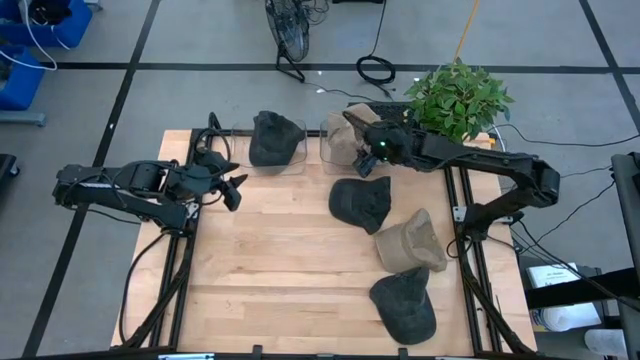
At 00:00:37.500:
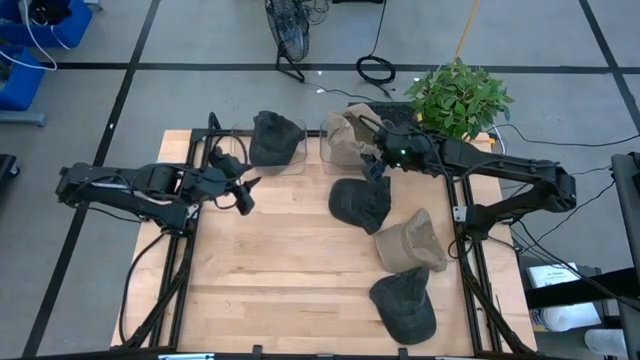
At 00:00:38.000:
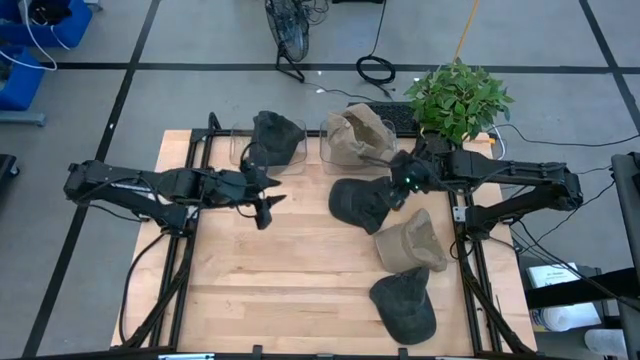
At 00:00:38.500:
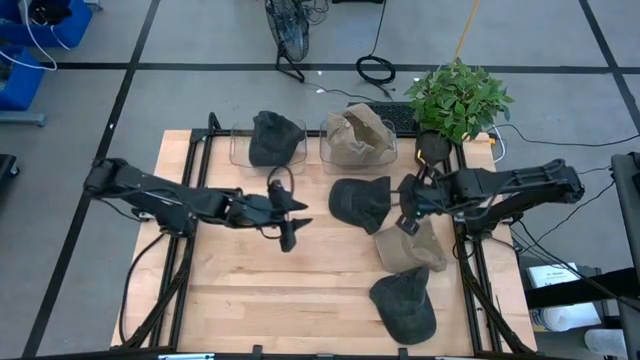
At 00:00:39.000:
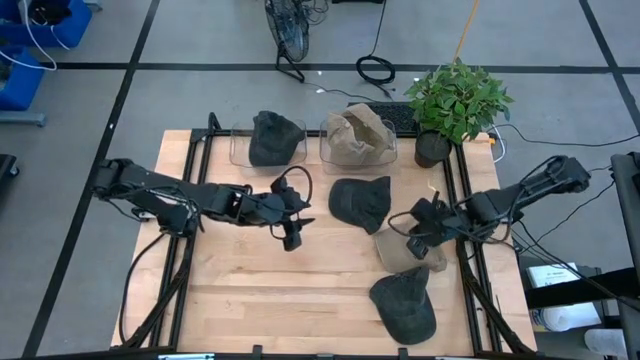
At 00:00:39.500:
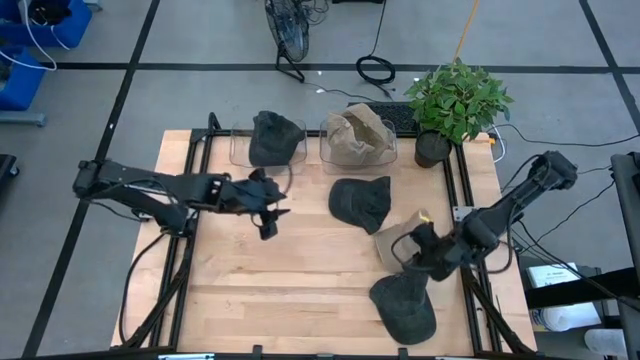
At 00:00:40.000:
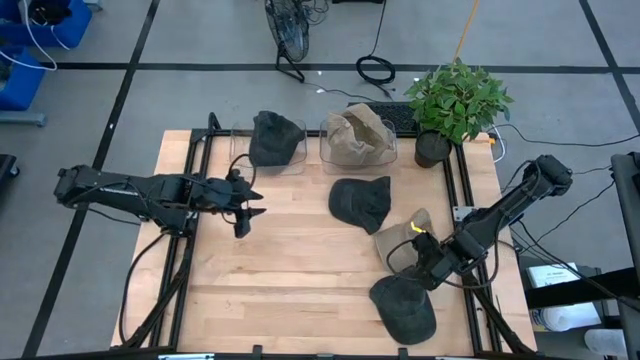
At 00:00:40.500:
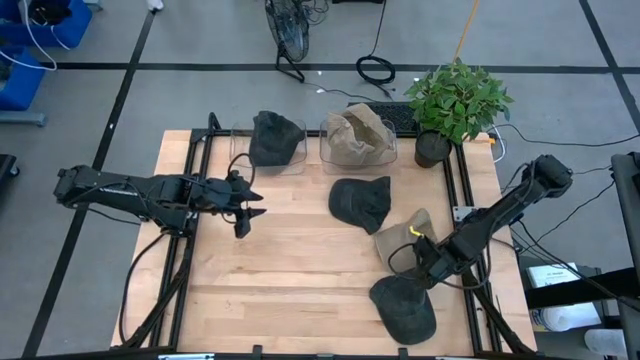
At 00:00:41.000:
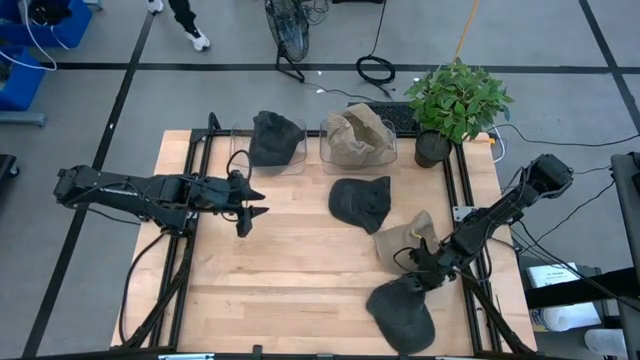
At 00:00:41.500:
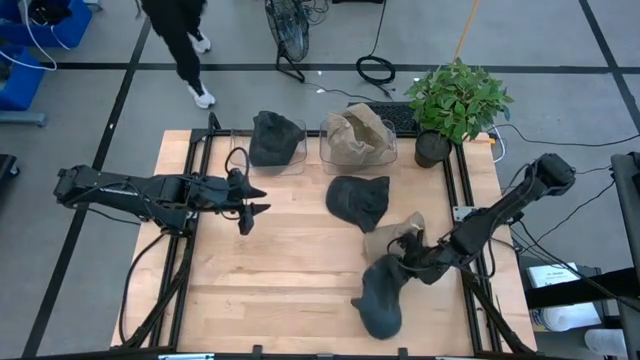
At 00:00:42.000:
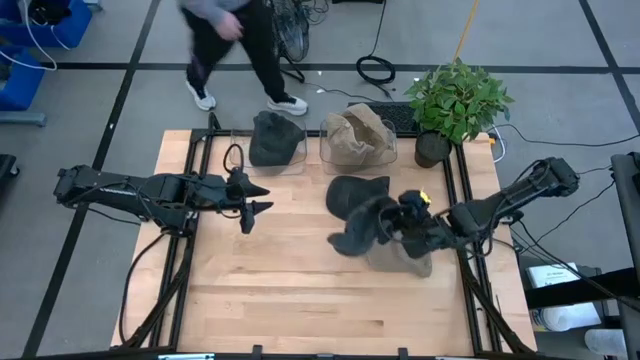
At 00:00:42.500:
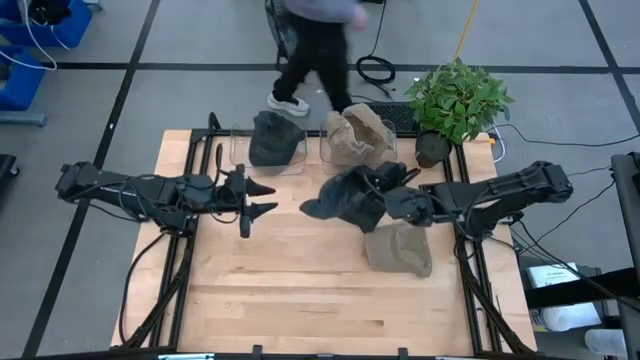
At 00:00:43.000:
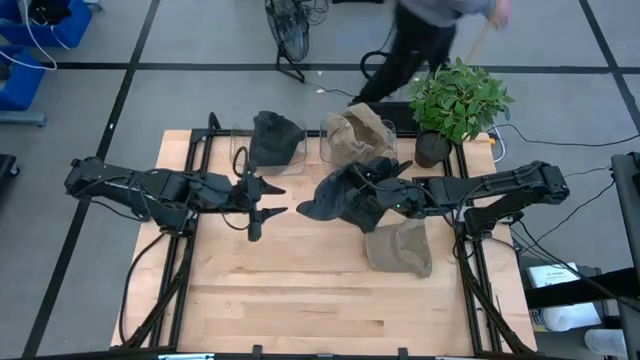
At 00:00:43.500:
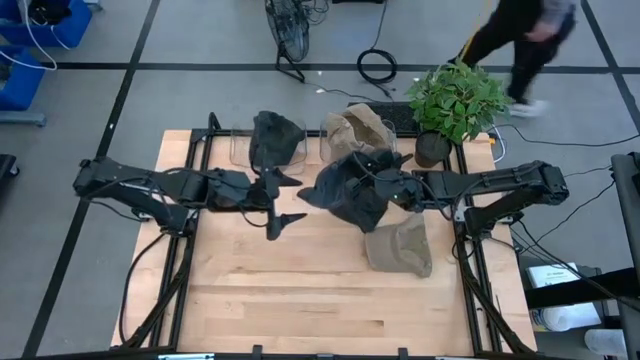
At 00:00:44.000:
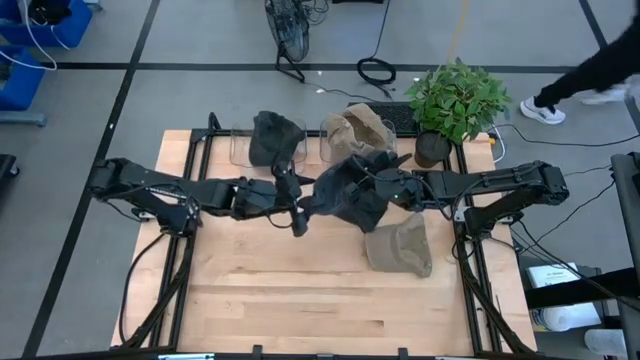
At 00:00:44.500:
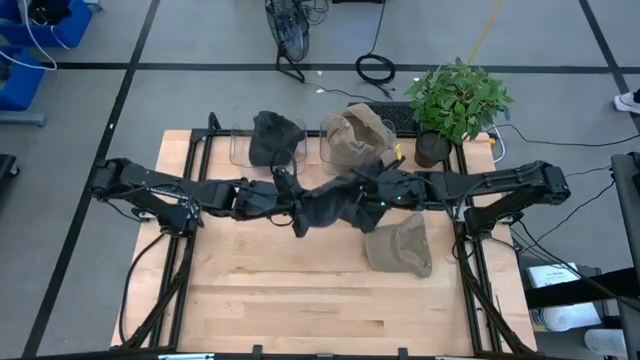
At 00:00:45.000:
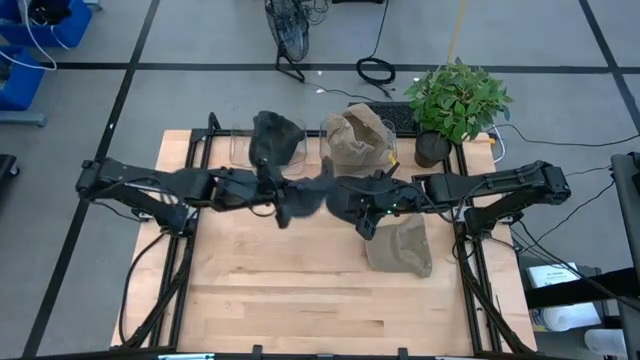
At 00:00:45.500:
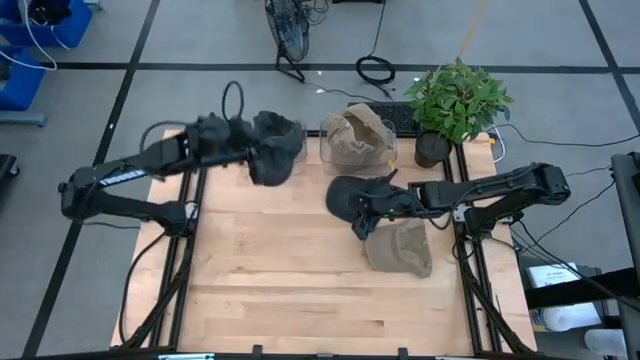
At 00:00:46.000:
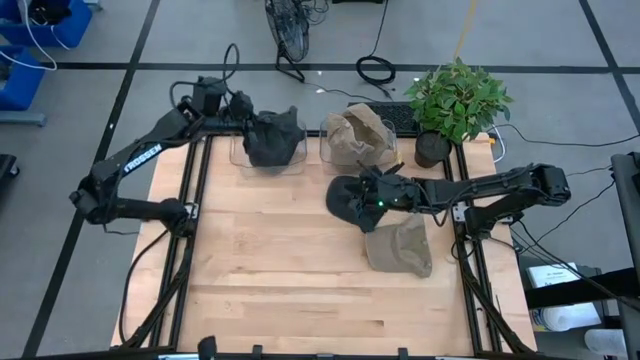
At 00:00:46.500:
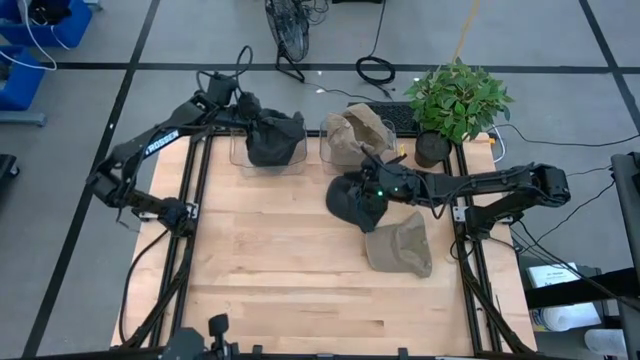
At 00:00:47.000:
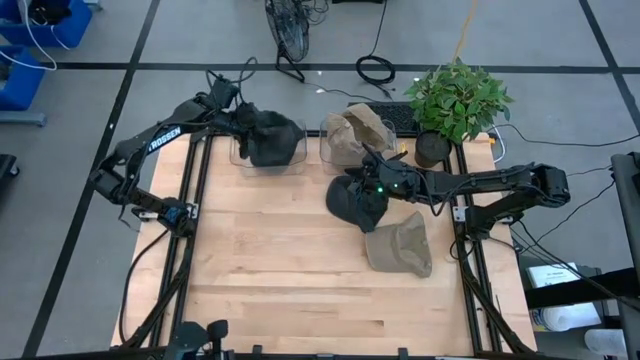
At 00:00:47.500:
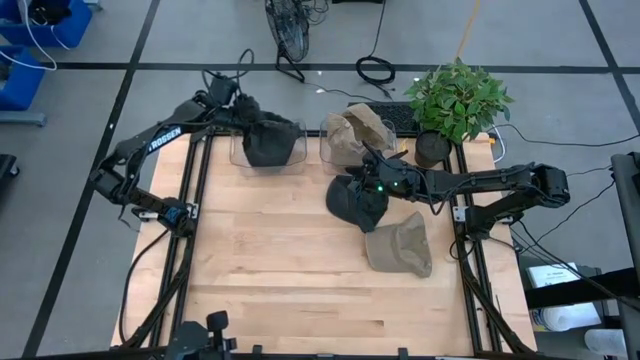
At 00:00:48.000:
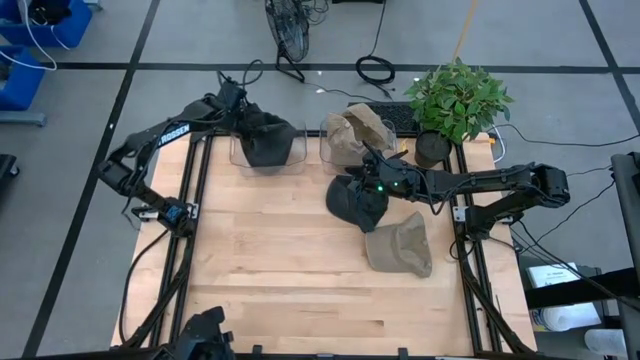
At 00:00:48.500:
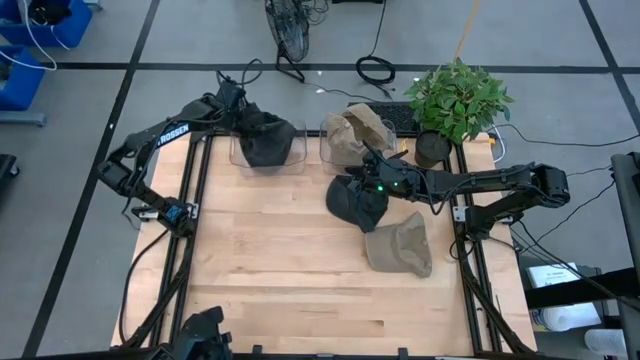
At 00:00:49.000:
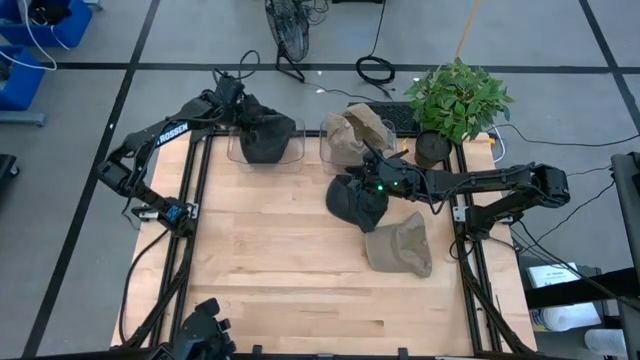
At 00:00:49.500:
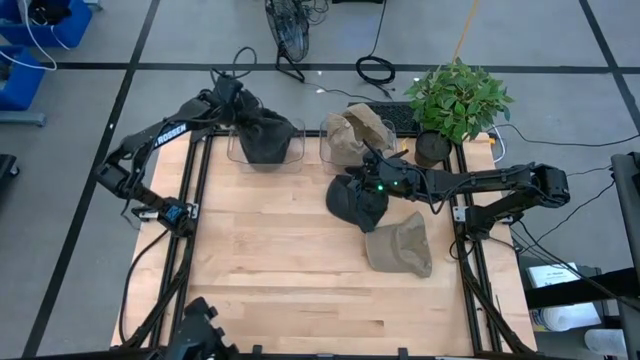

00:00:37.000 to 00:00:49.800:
Task: Pick & Place hat
Put the black cap into the left transparent bin

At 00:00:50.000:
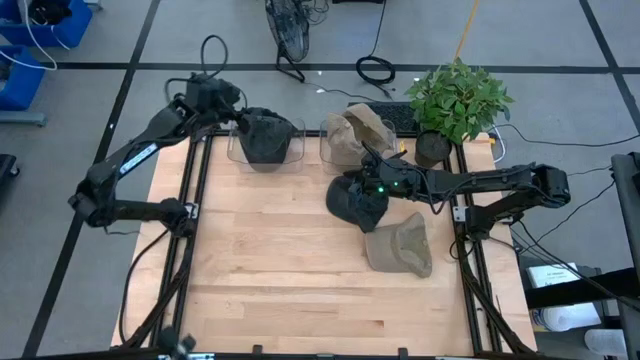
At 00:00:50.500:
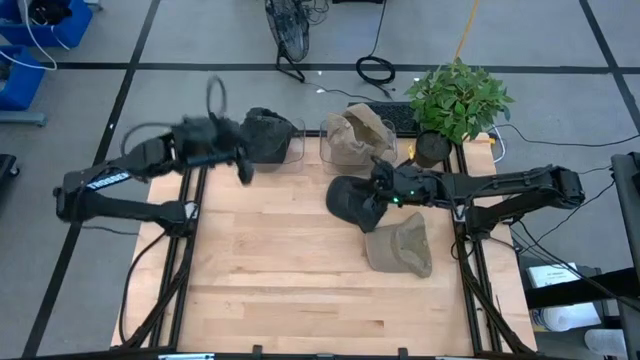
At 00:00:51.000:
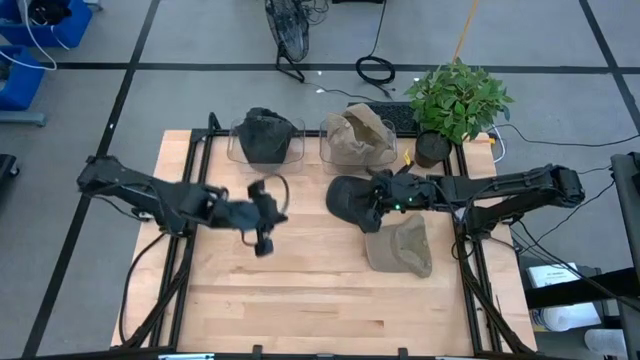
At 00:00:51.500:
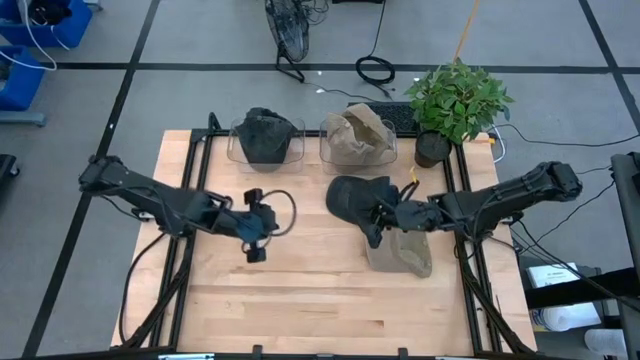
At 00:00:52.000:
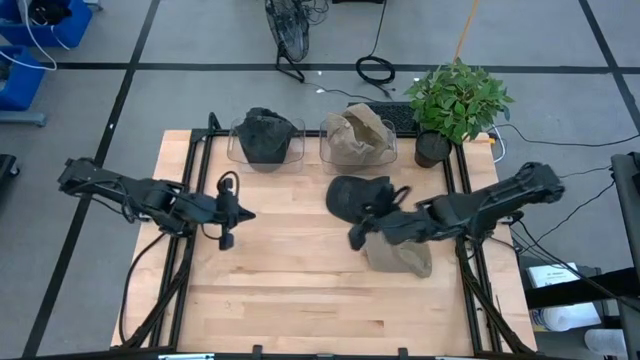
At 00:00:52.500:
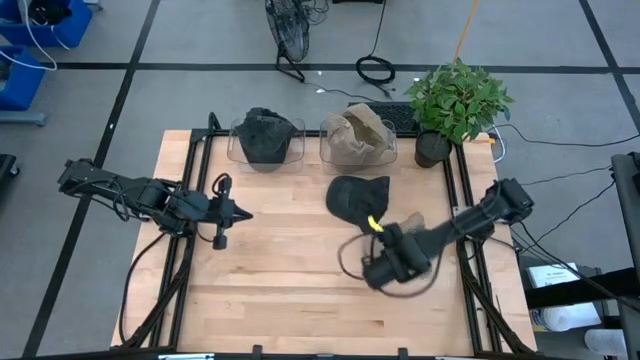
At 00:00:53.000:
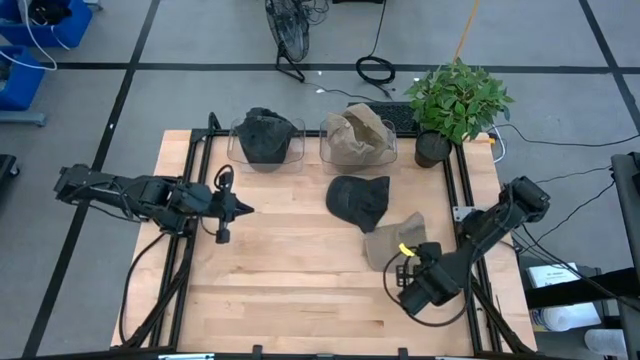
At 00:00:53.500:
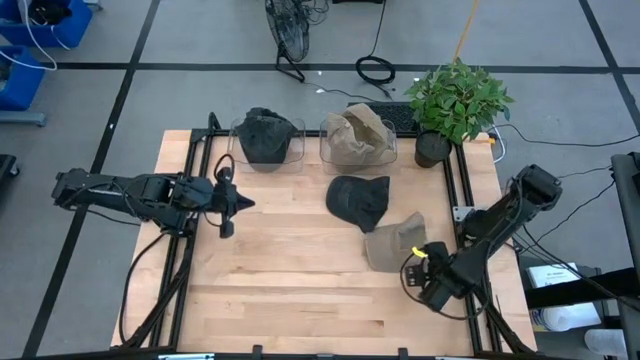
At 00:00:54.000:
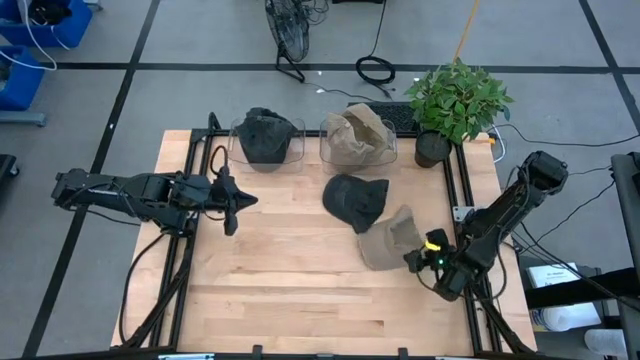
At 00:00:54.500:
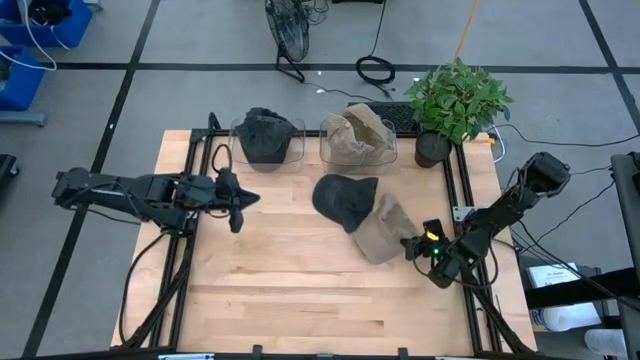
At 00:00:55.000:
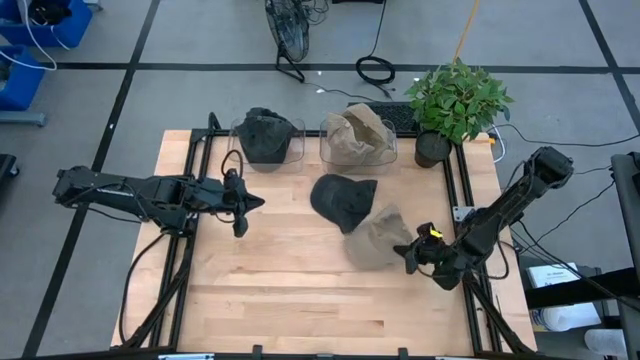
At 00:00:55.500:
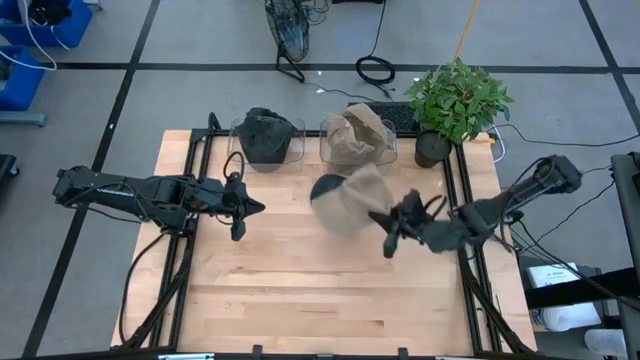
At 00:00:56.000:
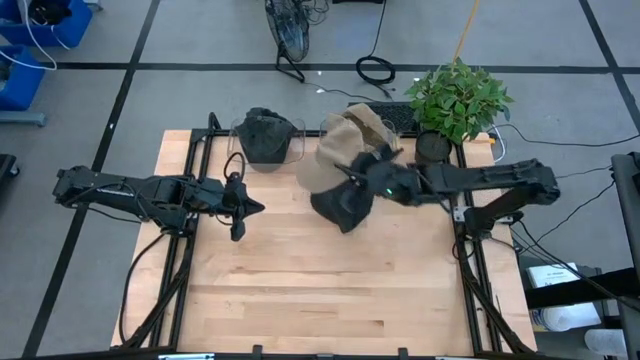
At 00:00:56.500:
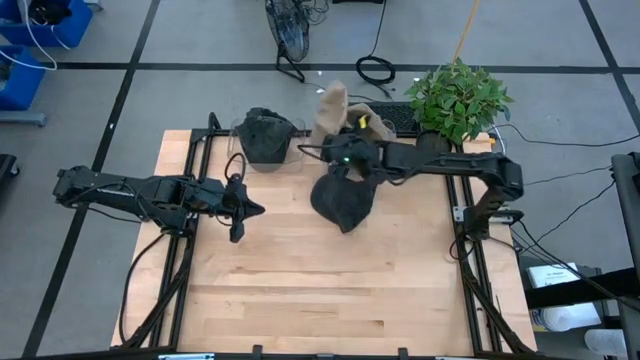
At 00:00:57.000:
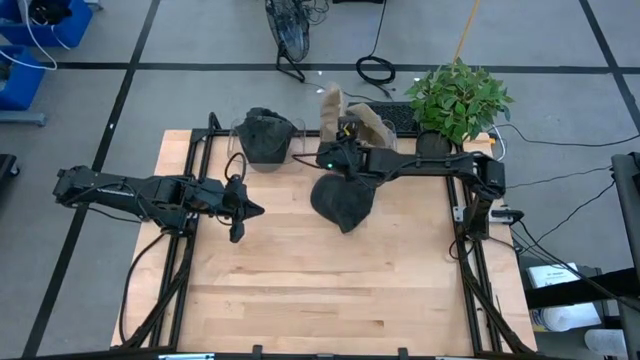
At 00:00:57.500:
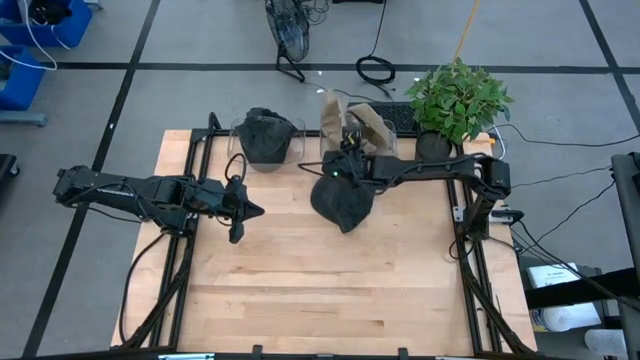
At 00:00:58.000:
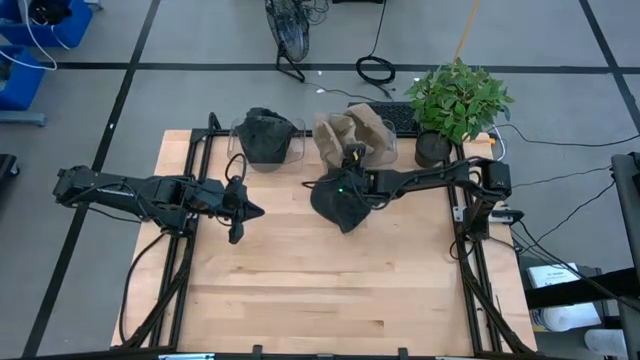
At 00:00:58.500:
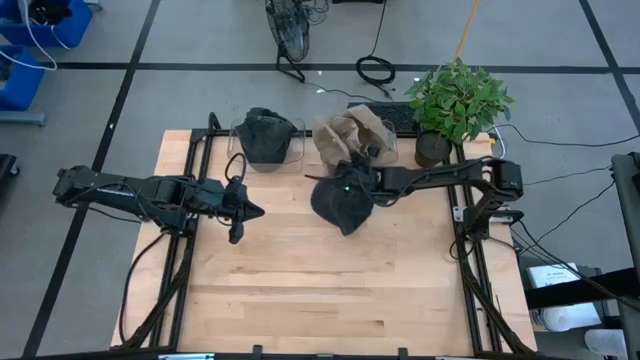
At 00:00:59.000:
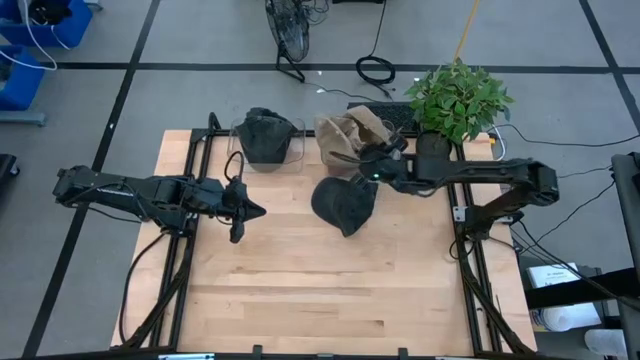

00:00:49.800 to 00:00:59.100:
Put the brown cap into the right transparent bin
